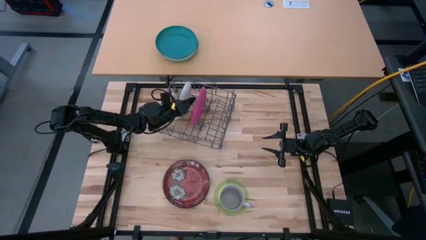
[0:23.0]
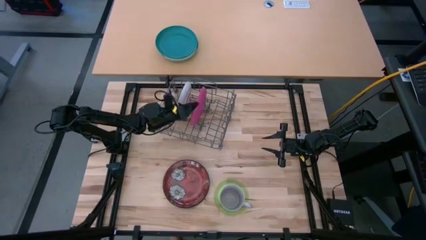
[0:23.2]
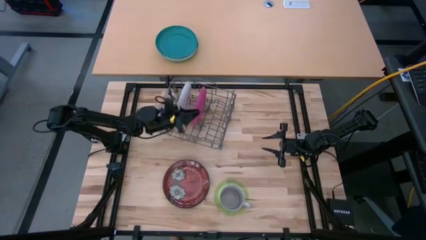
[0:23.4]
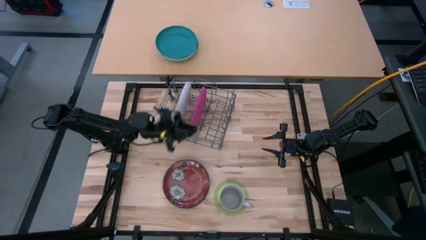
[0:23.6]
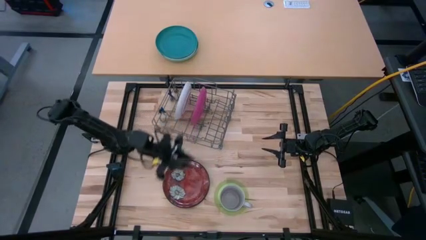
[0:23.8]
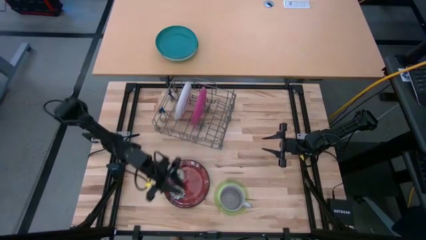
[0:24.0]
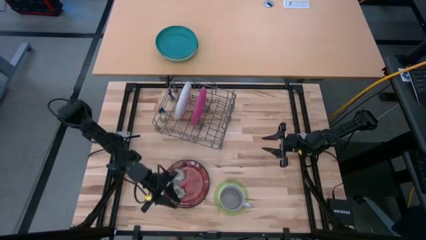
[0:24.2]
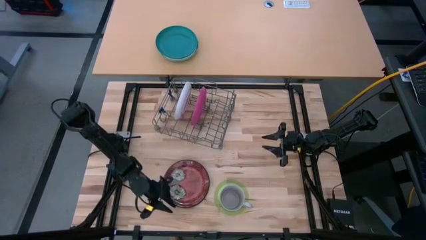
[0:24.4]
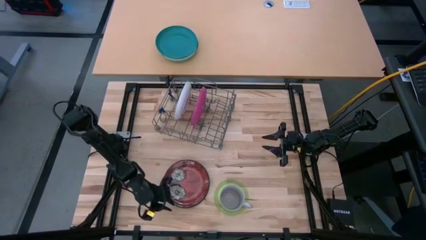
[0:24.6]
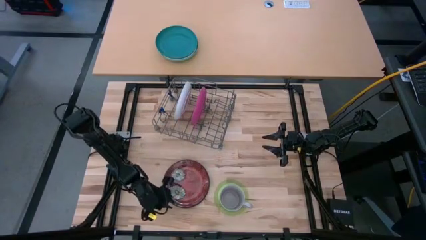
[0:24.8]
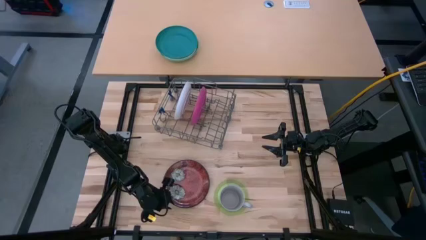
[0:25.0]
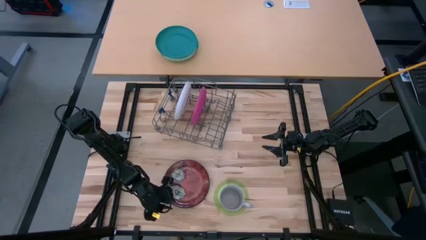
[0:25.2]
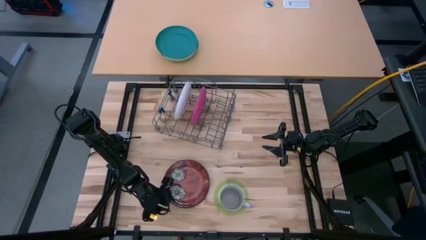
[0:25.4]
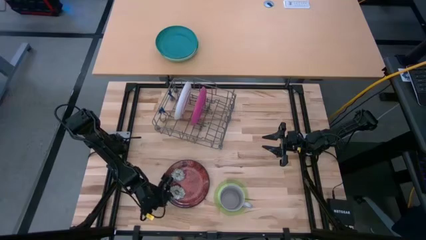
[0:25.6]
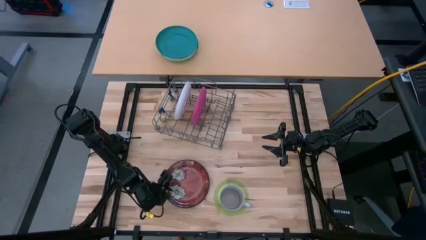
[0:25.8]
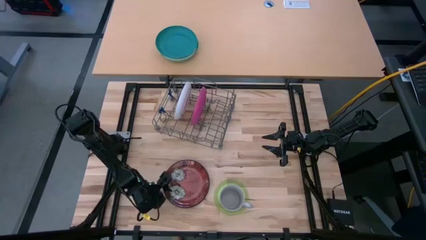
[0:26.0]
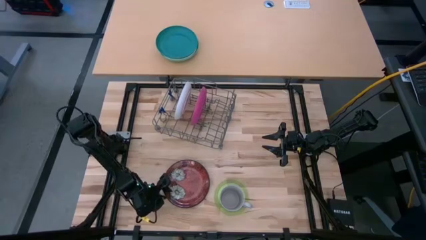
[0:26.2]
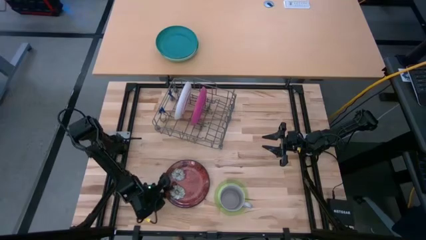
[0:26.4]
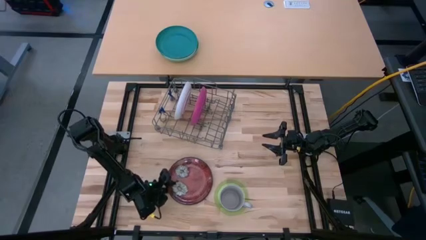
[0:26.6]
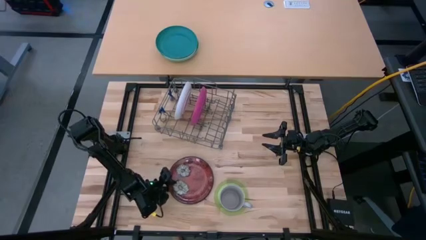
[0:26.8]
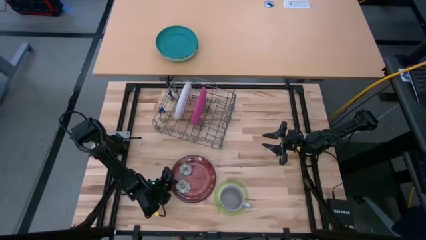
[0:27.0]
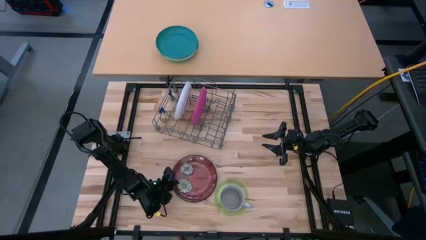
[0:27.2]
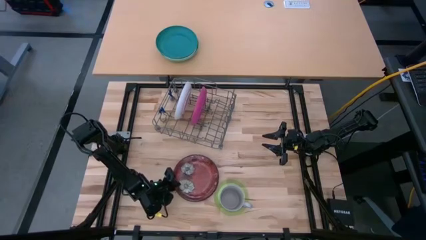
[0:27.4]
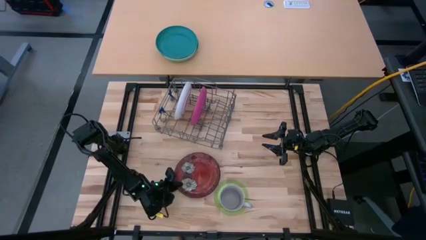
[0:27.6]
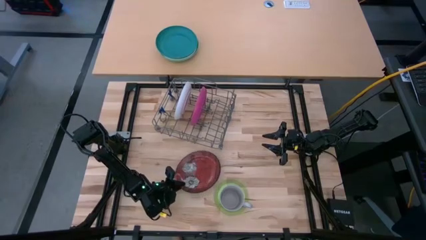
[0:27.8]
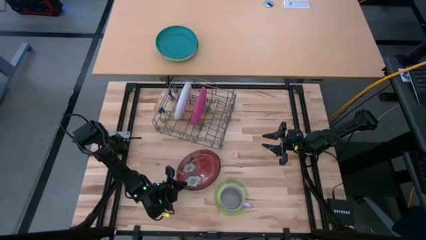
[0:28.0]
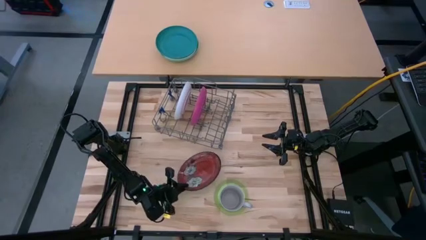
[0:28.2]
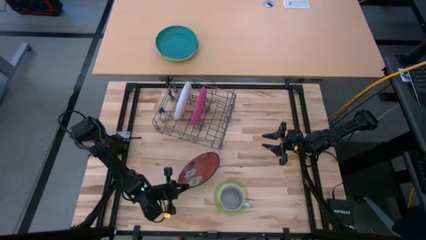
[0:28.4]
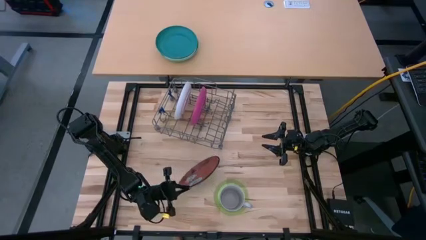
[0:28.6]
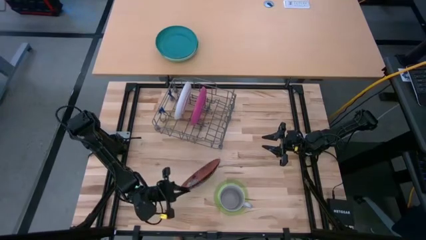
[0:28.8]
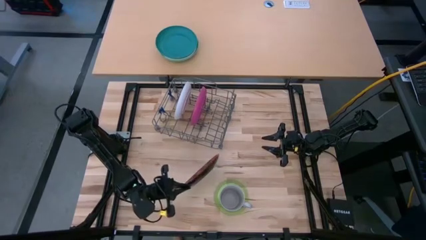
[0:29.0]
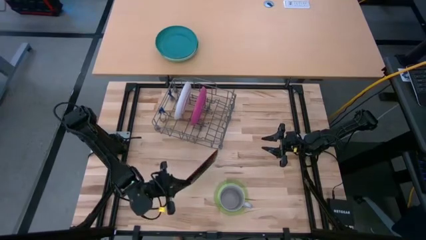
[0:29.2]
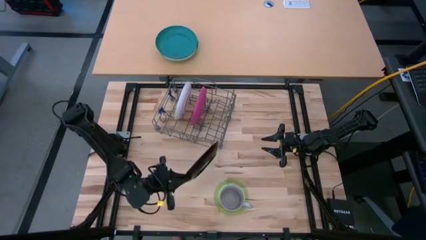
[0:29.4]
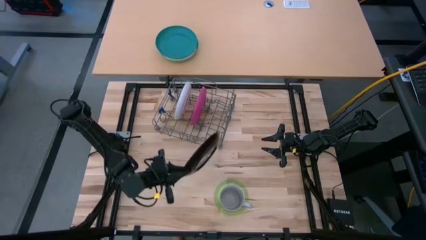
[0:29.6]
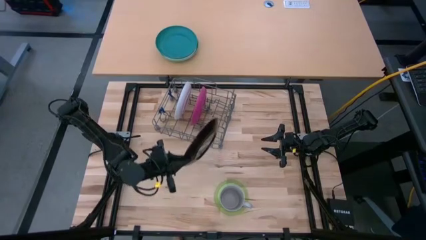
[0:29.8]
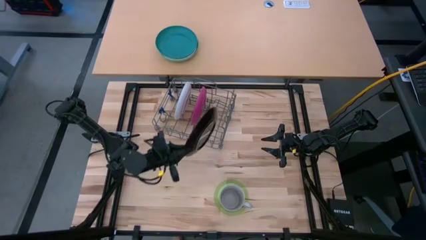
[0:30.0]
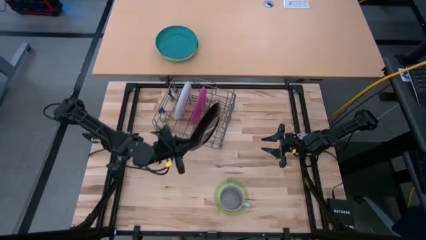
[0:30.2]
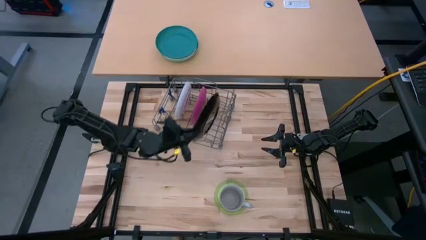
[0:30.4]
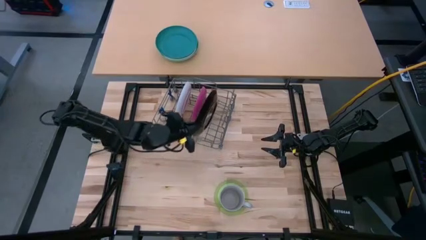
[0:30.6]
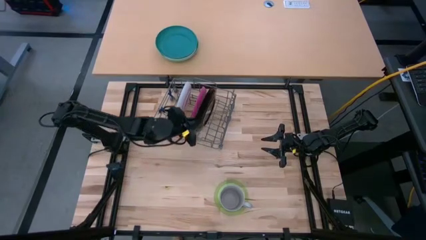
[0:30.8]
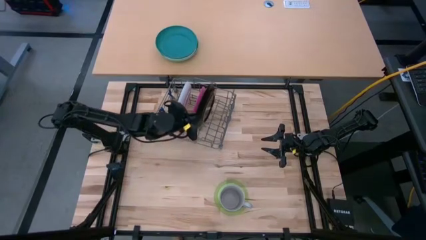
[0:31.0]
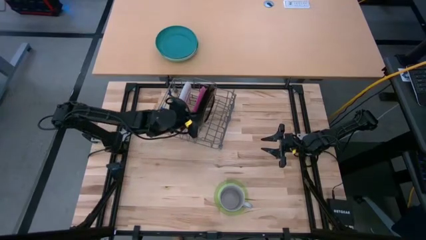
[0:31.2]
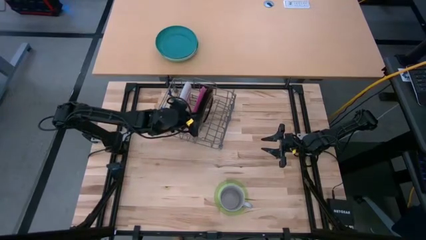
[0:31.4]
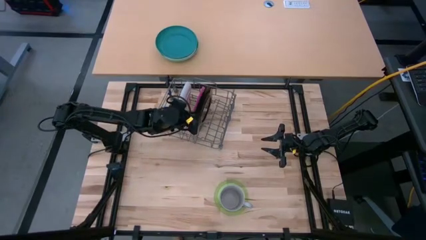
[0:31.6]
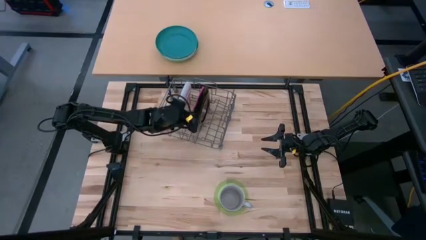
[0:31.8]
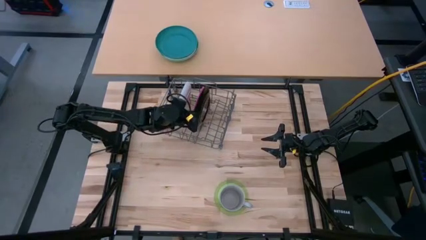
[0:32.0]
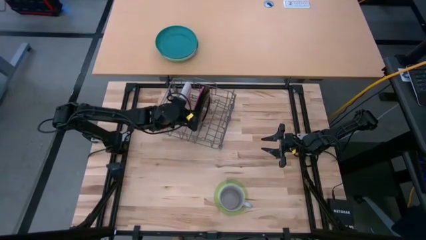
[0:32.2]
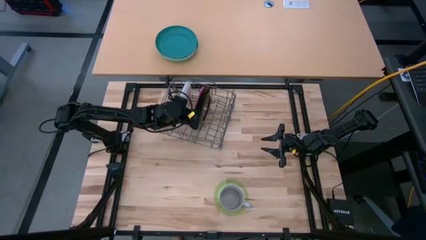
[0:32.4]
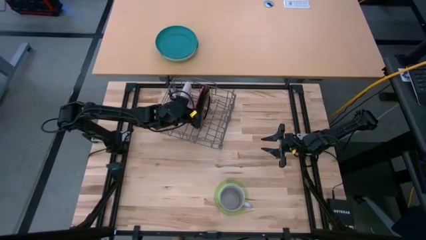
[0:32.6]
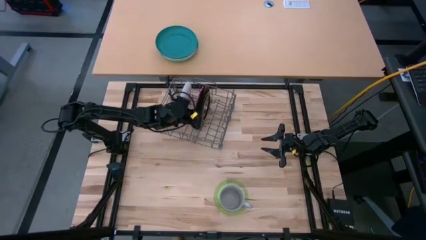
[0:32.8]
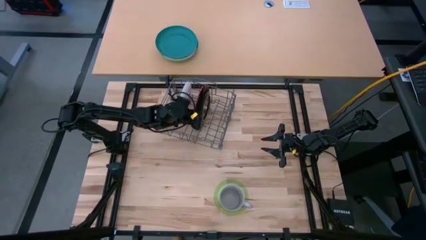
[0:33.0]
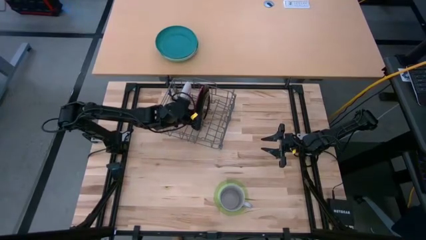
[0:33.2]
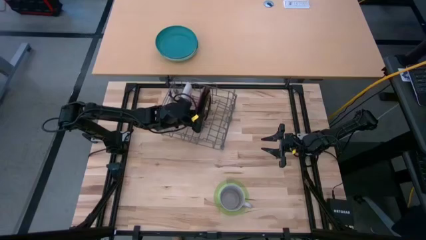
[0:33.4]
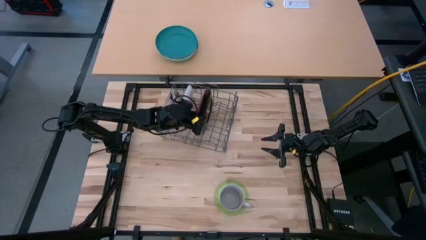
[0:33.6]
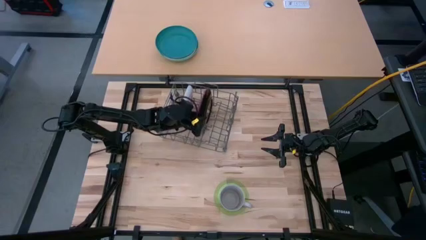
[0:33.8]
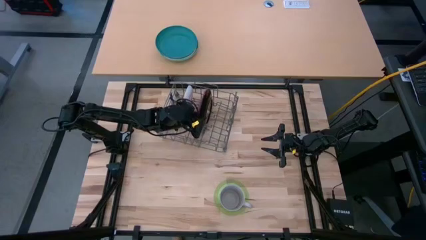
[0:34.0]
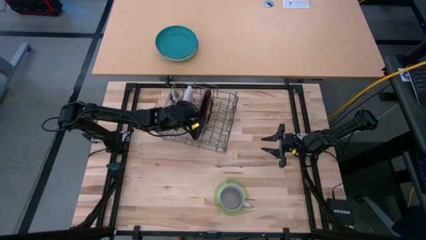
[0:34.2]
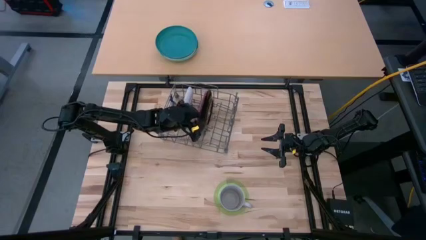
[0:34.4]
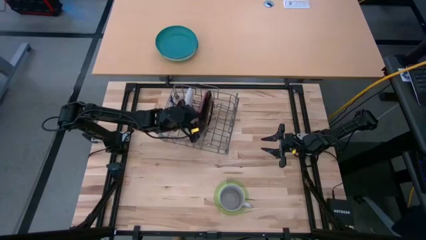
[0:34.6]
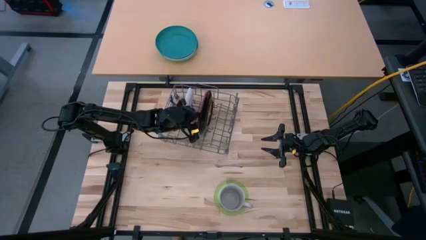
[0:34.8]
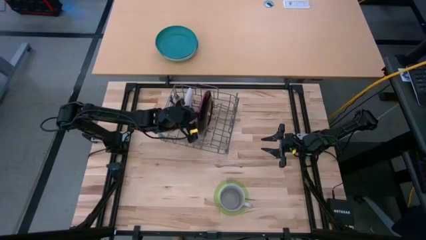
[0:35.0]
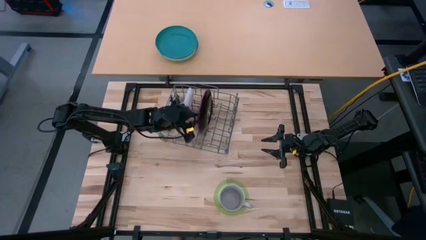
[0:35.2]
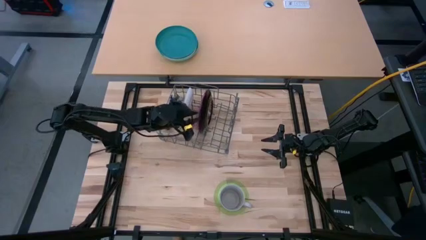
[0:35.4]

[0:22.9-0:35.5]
Task: Sort dishes
Put the red plate in the dish rack
